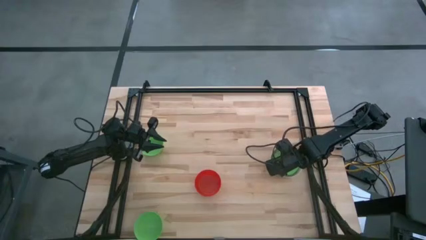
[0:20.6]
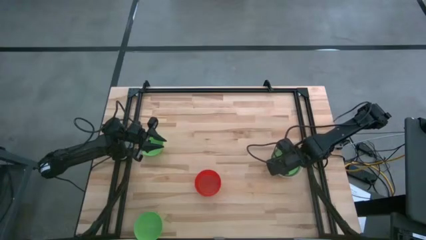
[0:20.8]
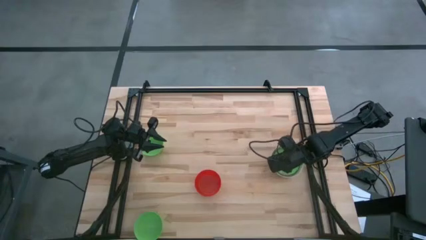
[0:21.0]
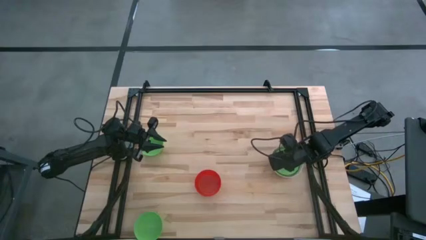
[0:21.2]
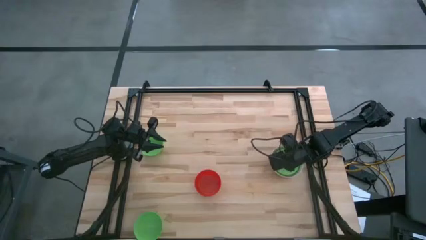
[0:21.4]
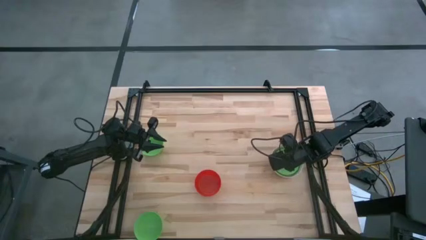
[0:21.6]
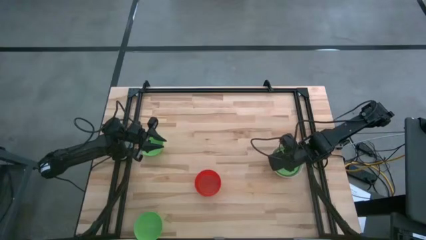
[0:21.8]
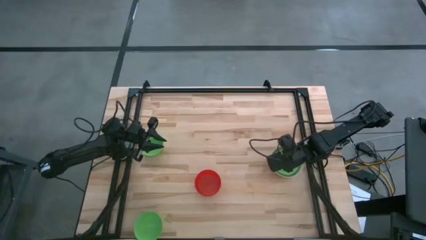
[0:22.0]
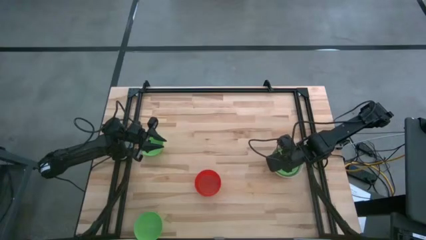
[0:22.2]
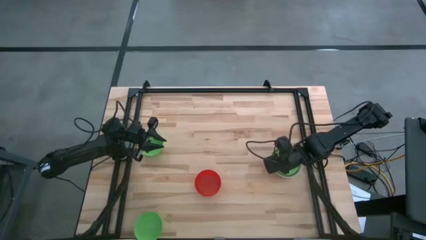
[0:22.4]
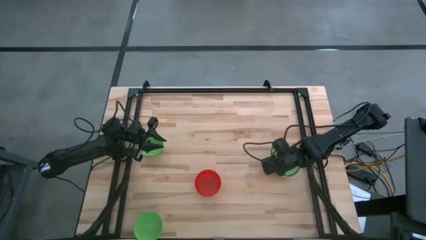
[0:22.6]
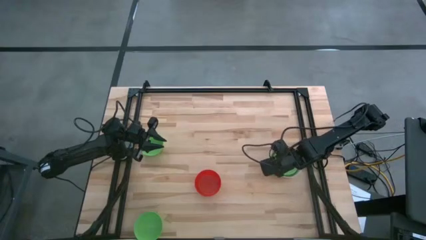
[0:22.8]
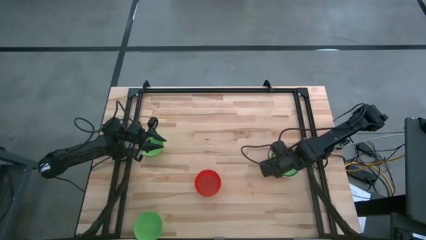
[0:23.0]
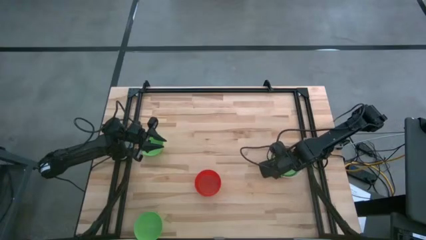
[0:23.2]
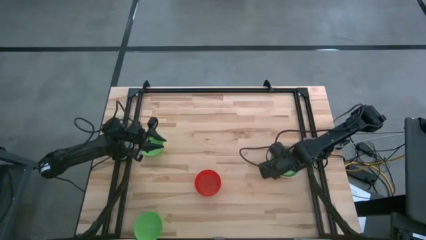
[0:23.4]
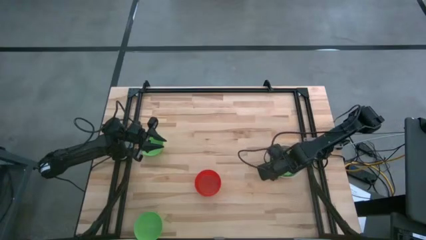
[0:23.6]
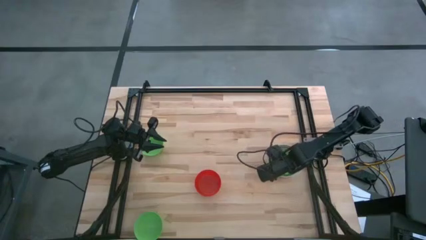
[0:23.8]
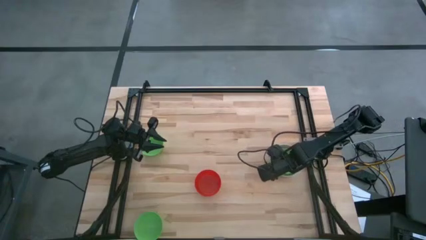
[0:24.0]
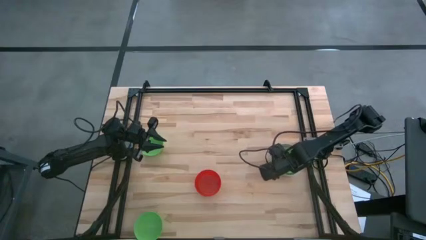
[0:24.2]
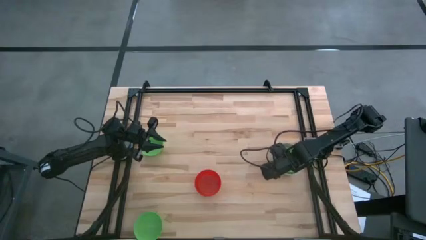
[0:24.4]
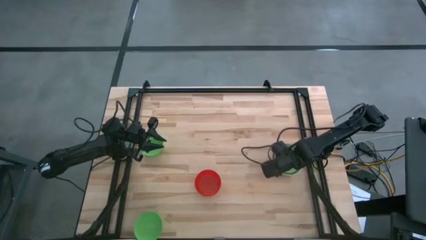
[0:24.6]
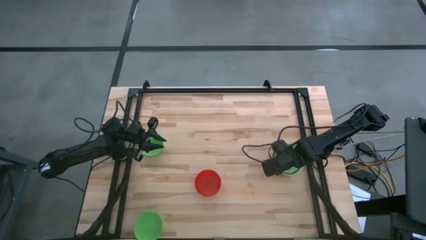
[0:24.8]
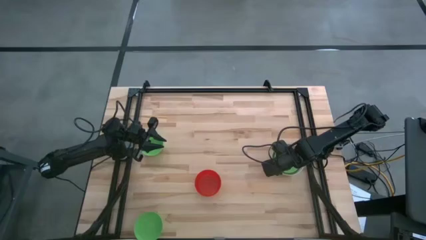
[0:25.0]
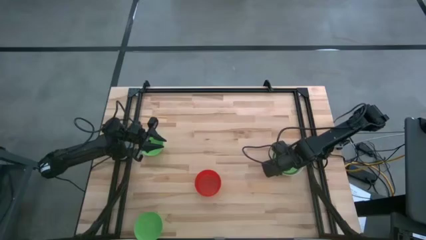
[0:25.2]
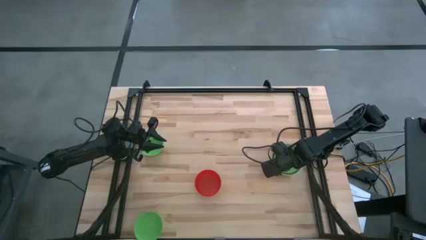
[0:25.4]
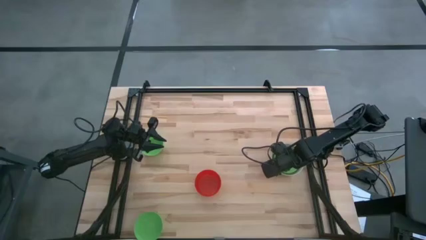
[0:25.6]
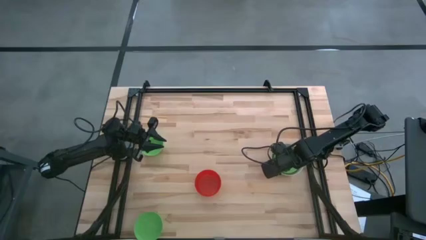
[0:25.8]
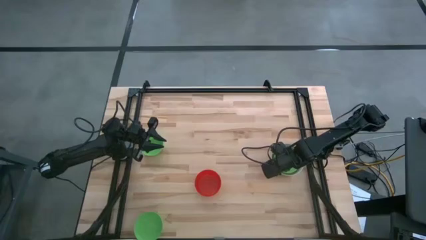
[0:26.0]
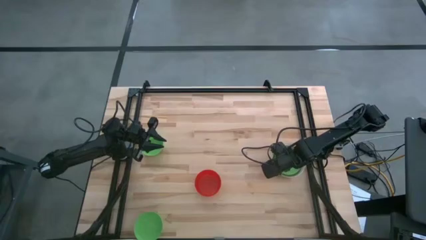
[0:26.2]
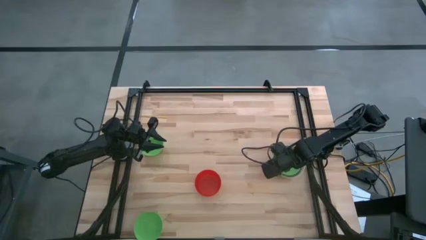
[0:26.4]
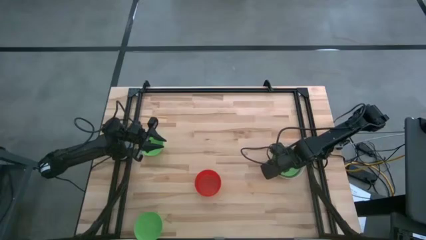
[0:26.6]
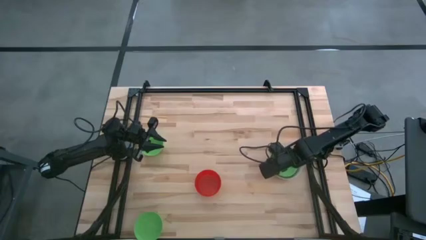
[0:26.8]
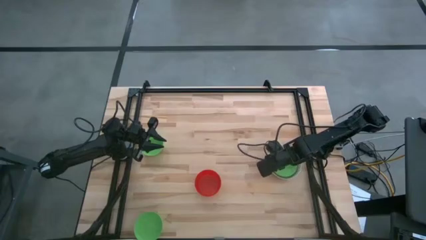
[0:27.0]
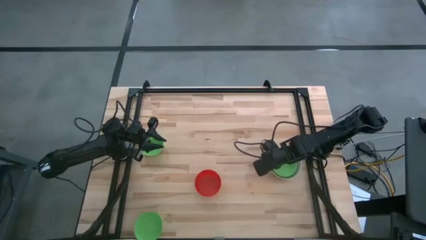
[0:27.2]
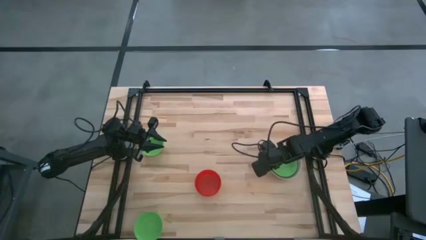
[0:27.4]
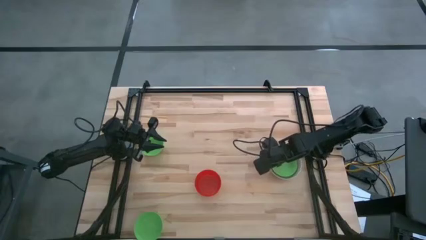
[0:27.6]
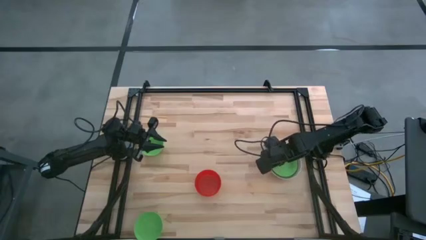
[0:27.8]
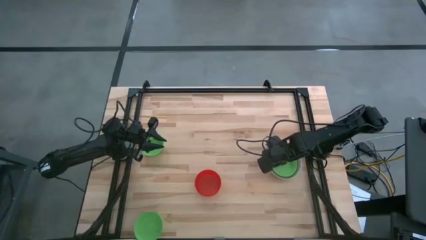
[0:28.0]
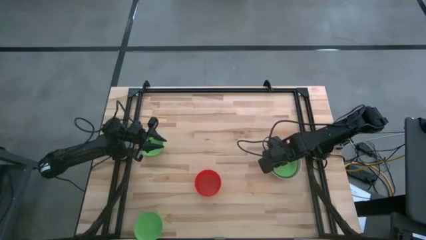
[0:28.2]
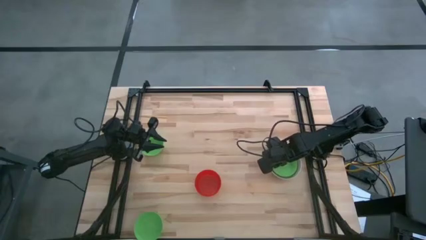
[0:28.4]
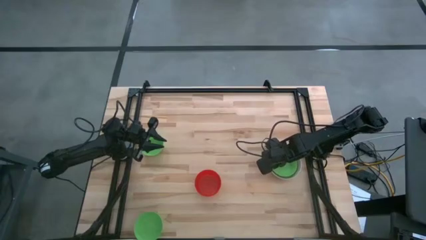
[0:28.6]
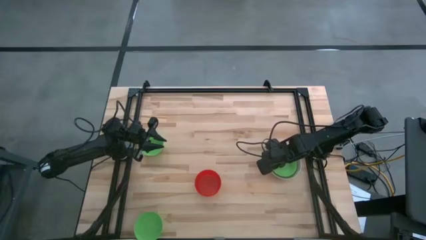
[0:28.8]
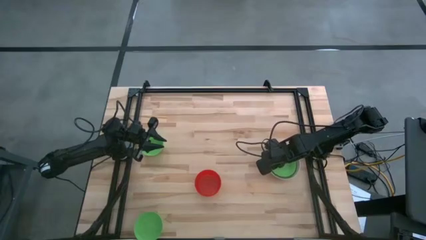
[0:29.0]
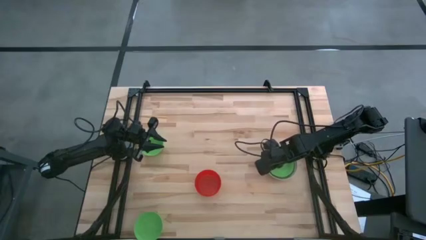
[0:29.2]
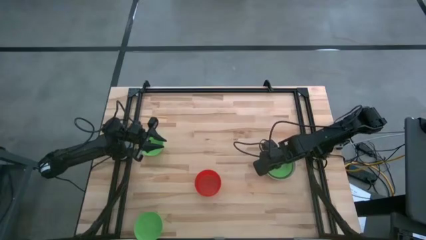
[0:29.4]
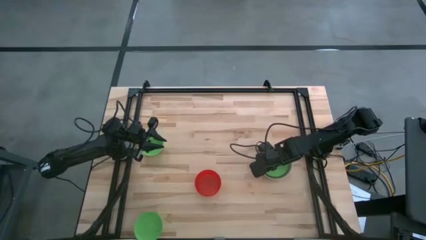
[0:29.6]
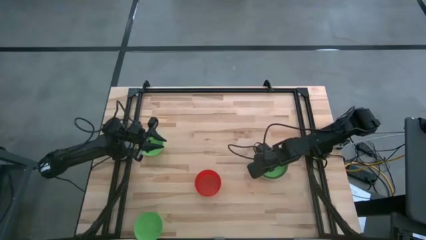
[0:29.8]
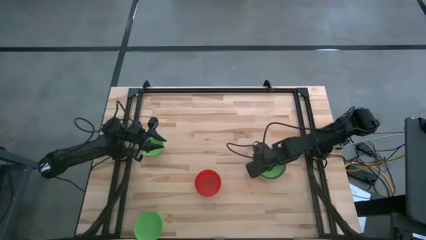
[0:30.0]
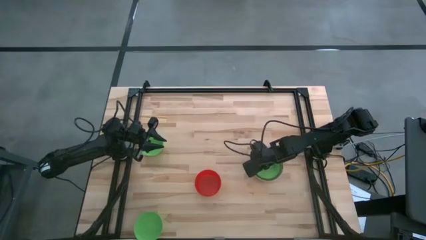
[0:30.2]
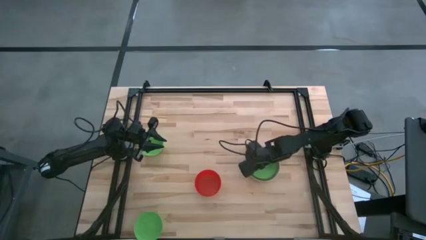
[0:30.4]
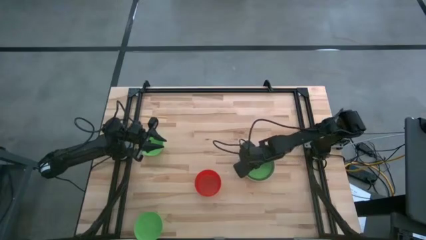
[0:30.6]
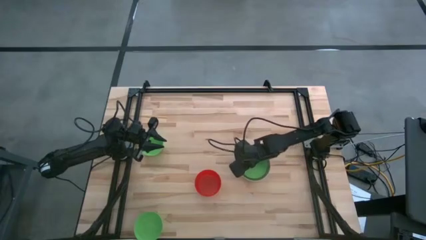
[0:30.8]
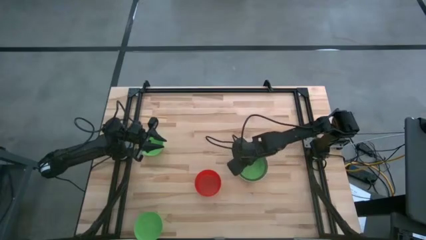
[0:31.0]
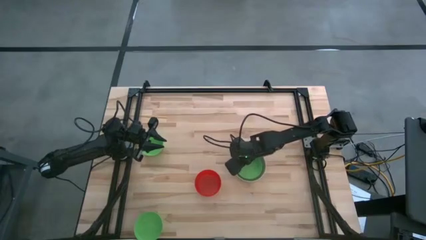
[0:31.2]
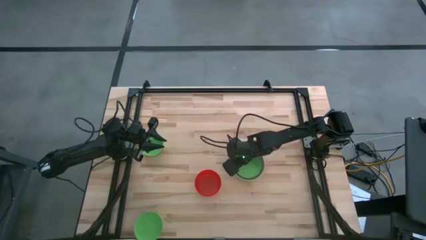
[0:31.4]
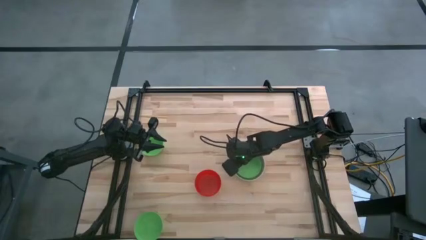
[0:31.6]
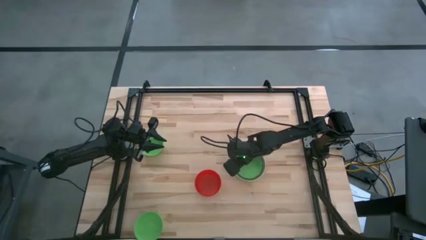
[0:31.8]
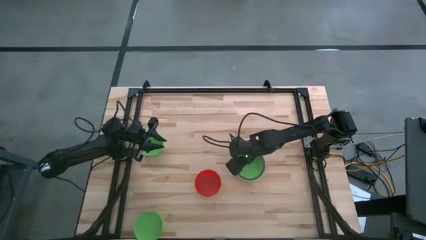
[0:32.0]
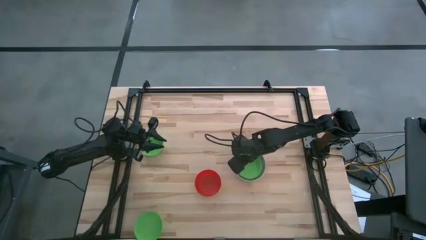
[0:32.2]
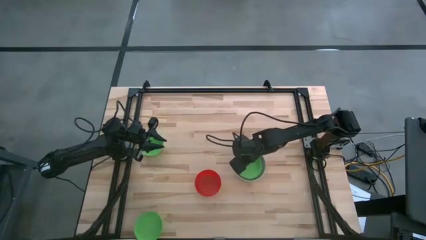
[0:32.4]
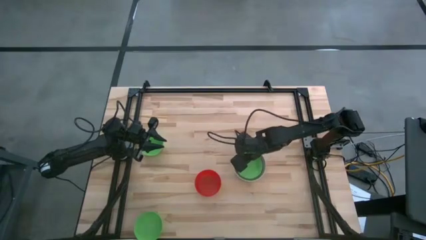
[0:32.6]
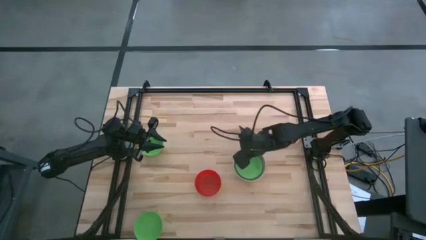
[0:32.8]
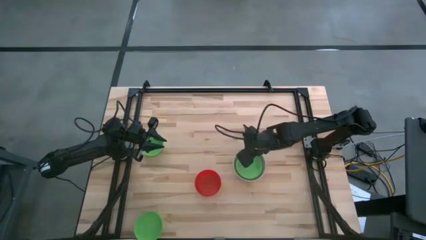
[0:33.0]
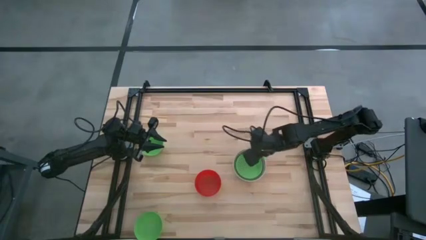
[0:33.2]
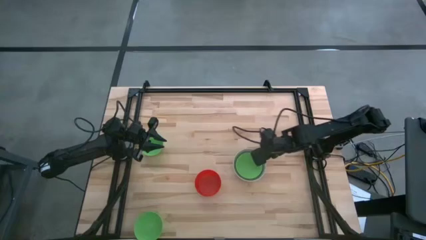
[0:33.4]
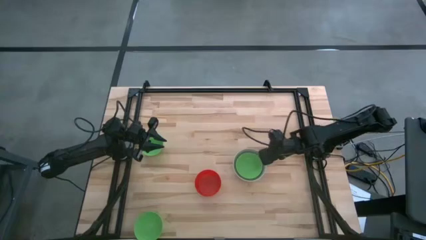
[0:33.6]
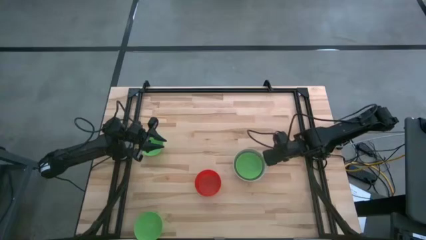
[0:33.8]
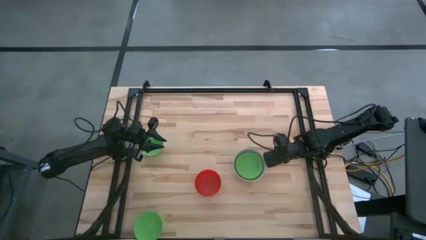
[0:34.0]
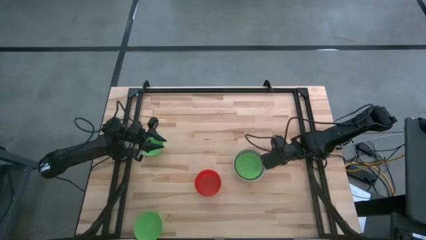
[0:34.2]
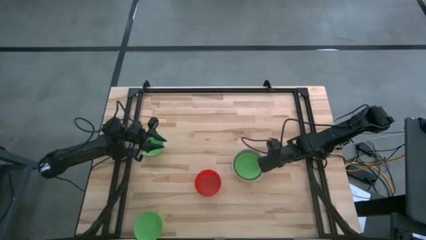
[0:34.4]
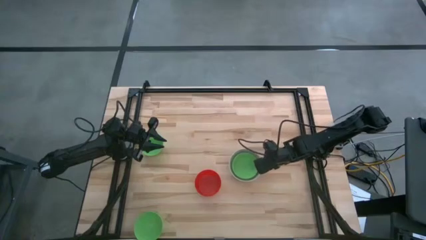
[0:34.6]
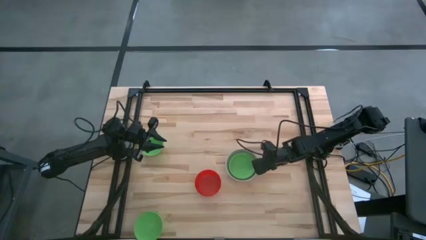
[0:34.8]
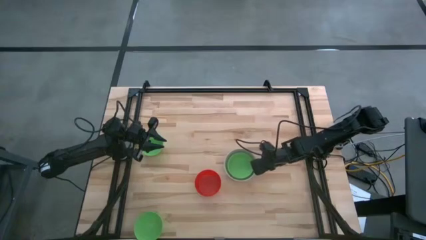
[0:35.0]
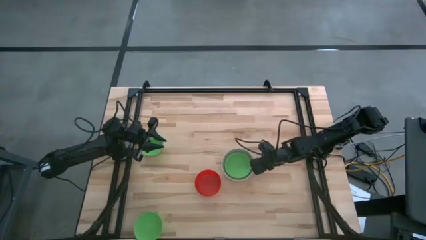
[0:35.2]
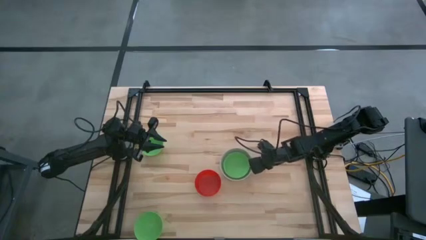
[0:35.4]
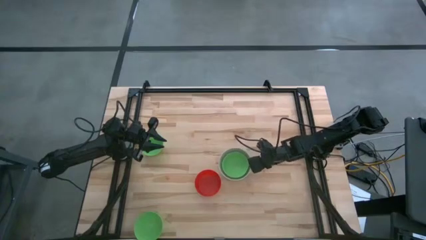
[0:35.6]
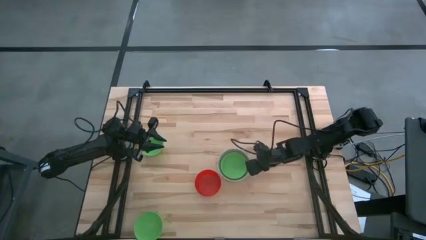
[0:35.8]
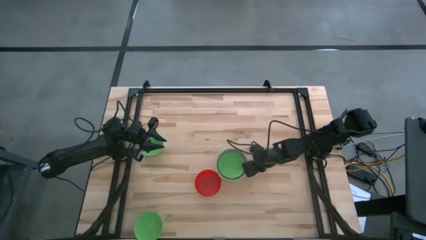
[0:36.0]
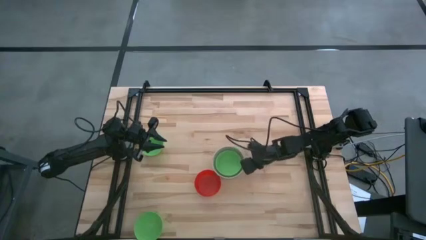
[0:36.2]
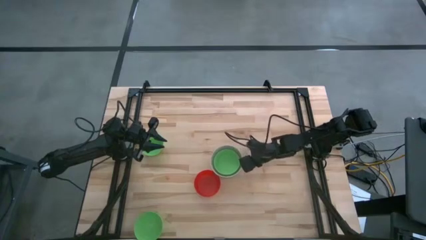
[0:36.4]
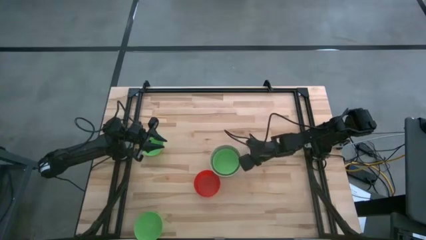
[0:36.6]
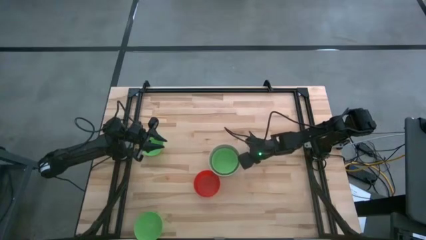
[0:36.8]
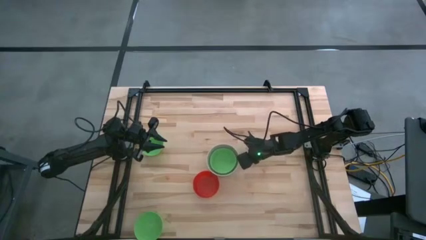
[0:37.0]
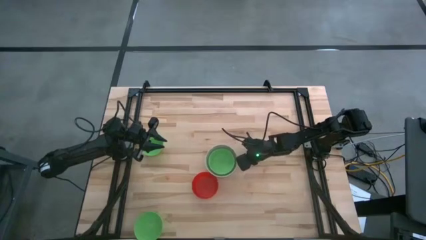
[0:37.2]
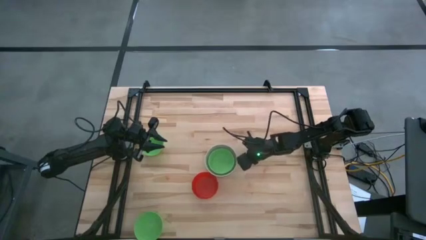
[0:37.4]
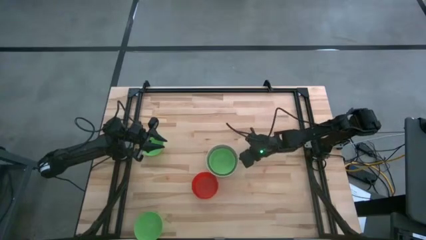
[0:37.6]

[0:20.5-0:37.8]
Move the stacked bowls to the center of the table
